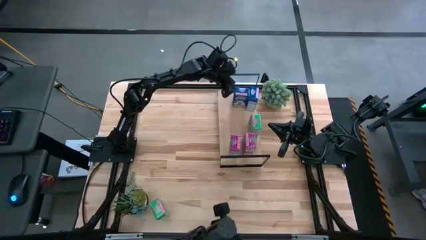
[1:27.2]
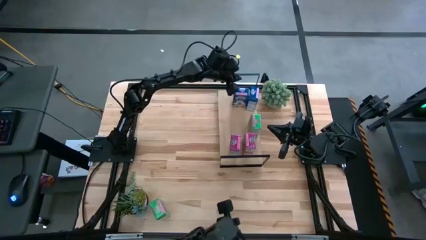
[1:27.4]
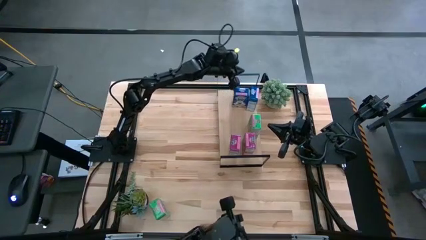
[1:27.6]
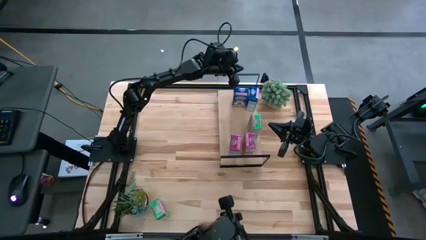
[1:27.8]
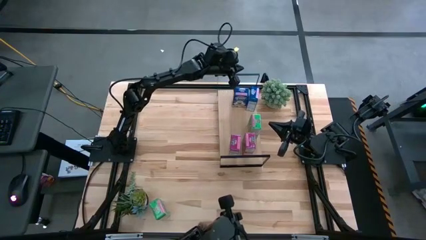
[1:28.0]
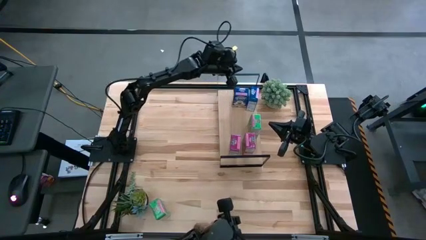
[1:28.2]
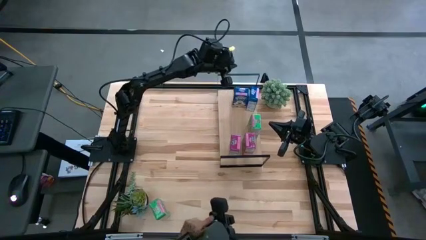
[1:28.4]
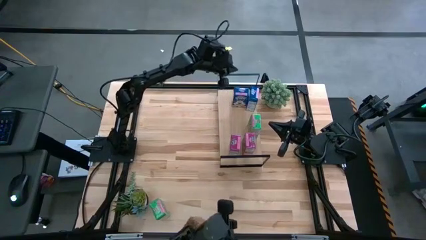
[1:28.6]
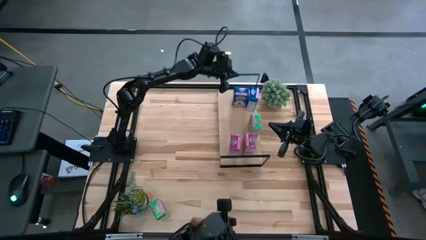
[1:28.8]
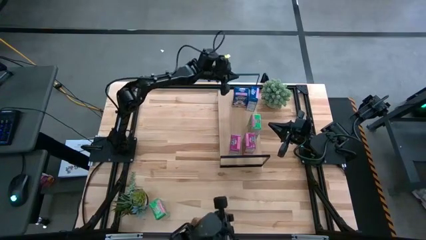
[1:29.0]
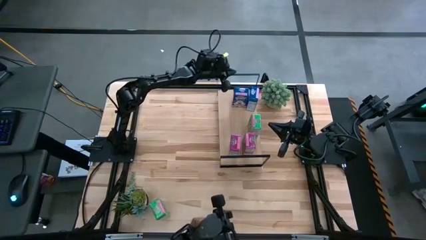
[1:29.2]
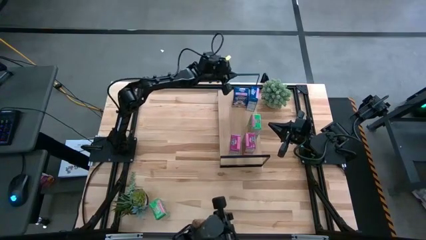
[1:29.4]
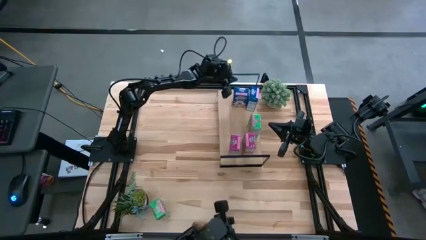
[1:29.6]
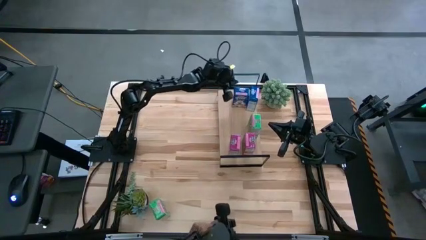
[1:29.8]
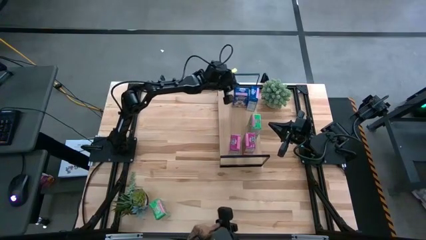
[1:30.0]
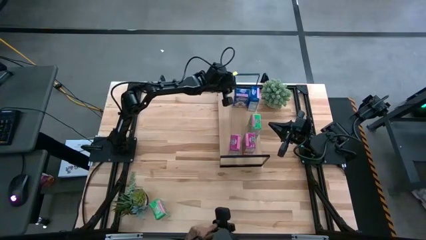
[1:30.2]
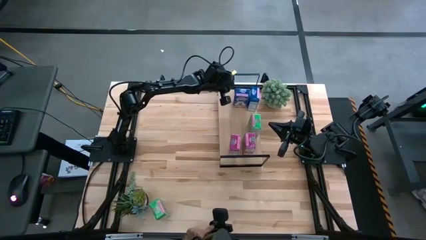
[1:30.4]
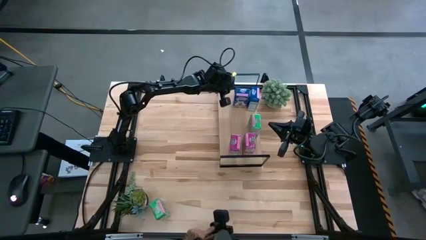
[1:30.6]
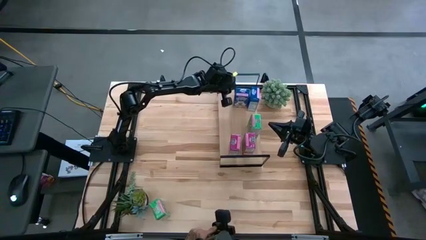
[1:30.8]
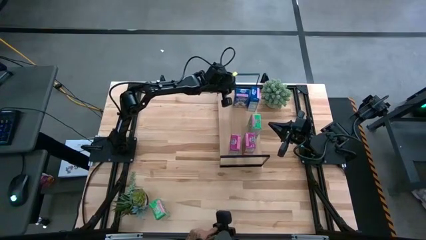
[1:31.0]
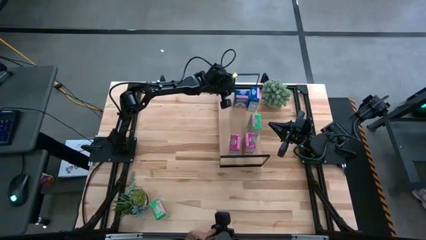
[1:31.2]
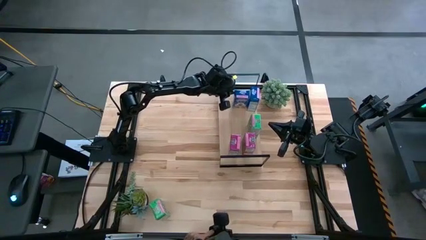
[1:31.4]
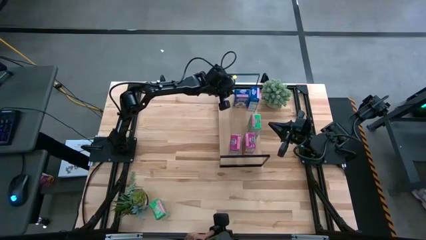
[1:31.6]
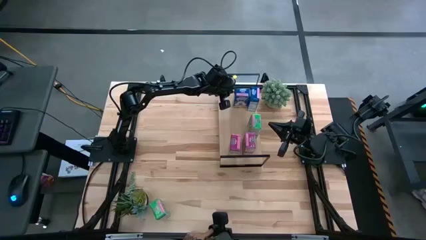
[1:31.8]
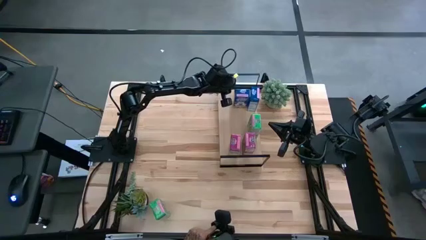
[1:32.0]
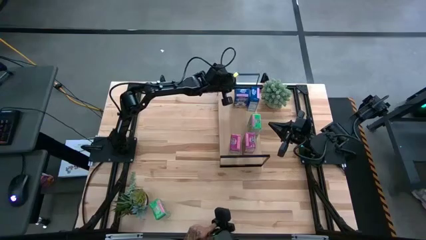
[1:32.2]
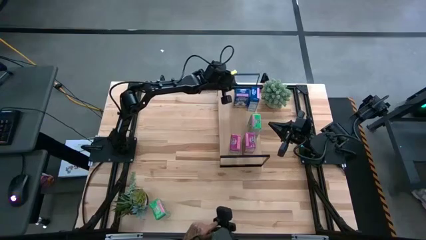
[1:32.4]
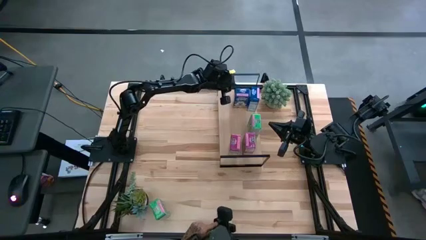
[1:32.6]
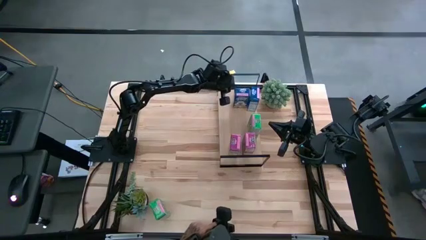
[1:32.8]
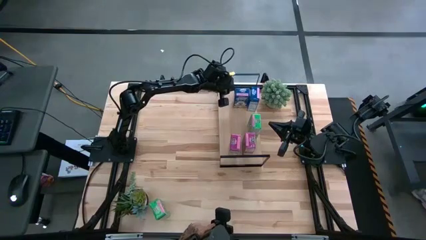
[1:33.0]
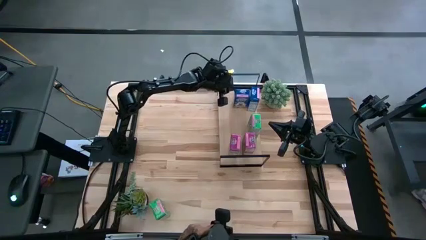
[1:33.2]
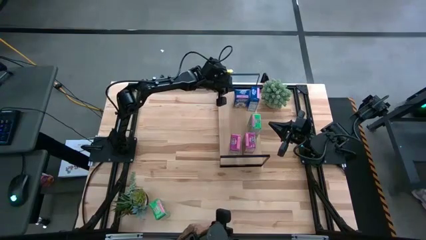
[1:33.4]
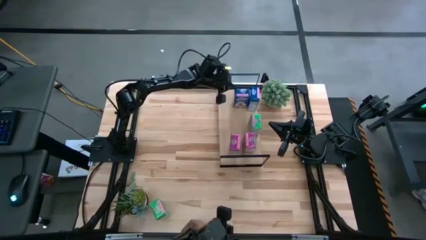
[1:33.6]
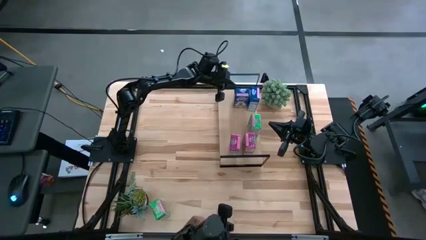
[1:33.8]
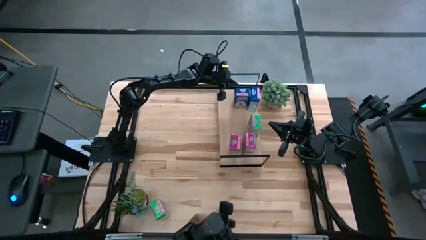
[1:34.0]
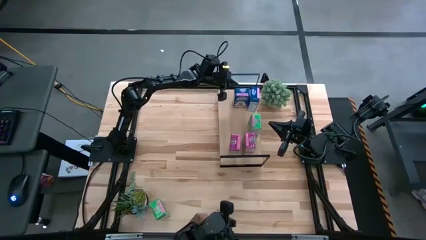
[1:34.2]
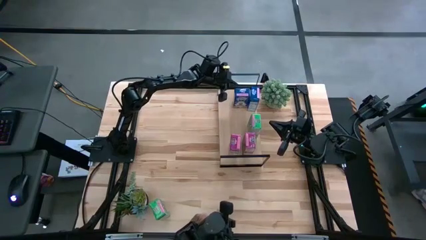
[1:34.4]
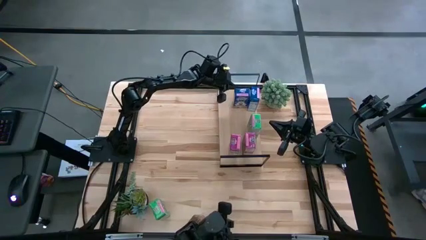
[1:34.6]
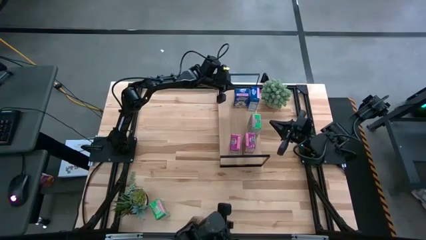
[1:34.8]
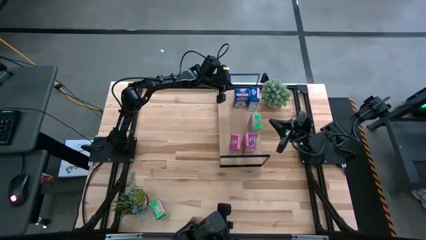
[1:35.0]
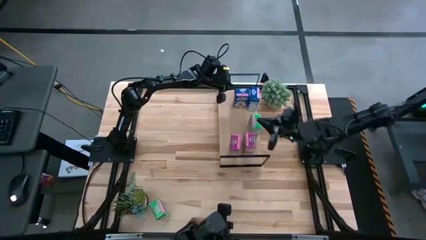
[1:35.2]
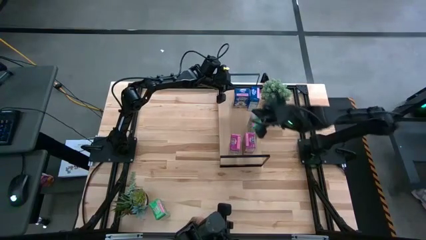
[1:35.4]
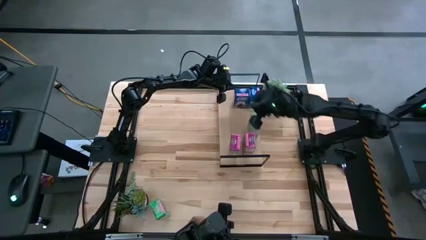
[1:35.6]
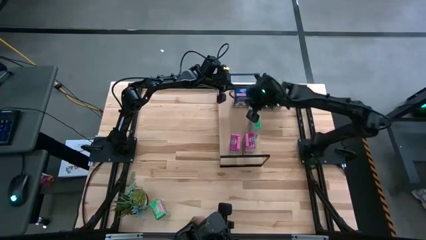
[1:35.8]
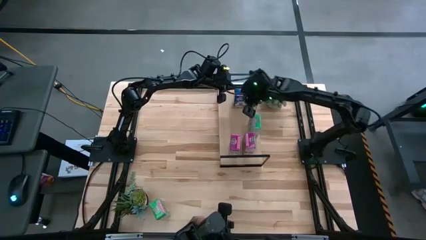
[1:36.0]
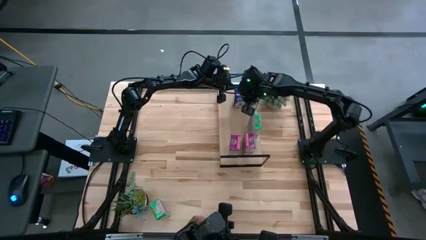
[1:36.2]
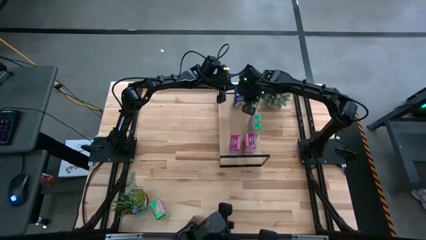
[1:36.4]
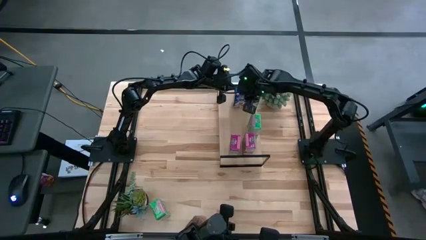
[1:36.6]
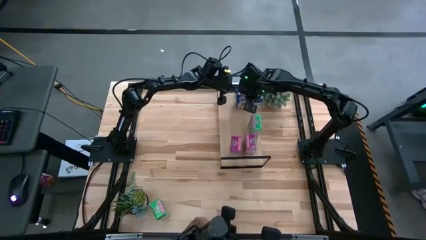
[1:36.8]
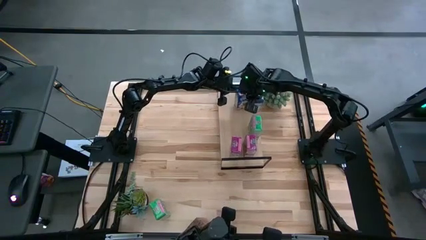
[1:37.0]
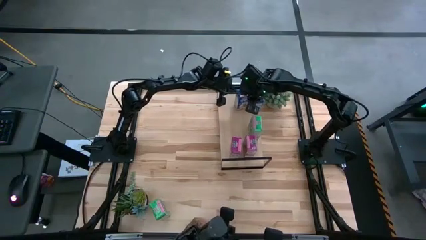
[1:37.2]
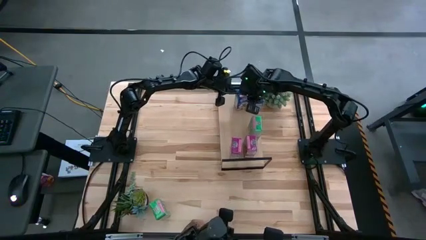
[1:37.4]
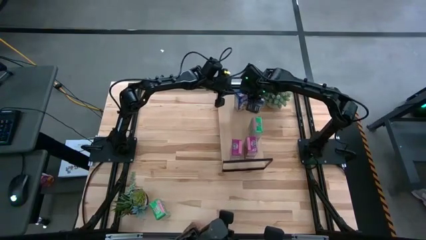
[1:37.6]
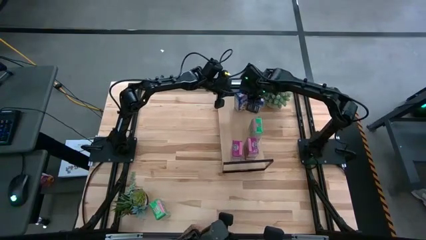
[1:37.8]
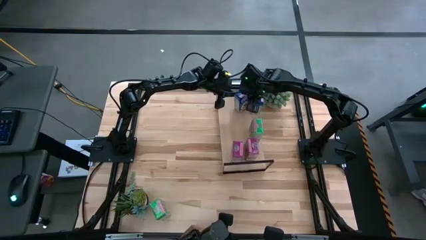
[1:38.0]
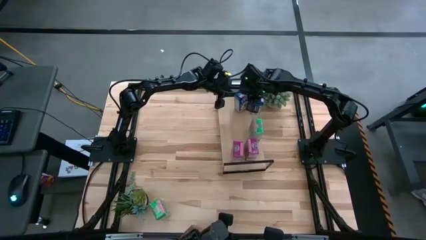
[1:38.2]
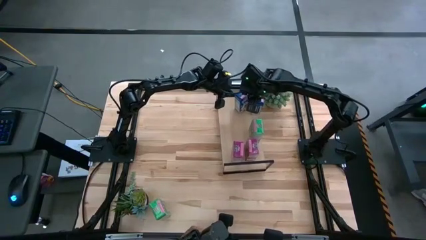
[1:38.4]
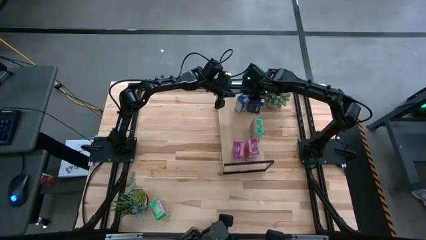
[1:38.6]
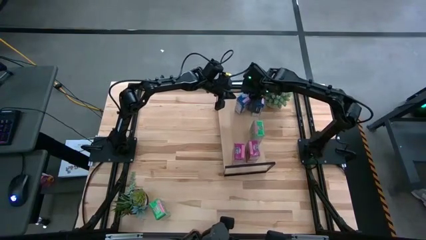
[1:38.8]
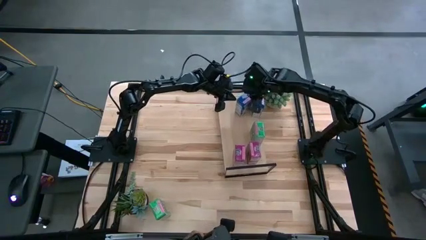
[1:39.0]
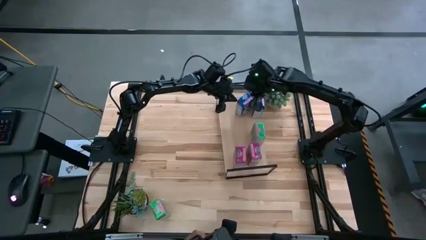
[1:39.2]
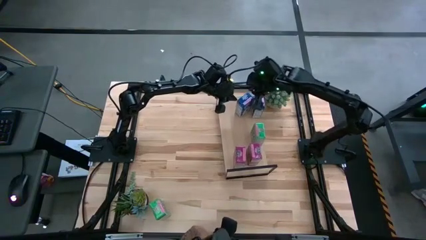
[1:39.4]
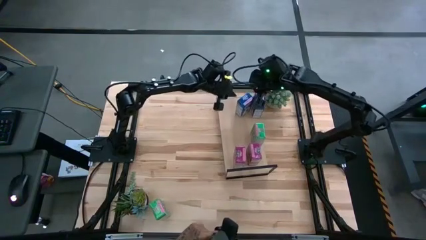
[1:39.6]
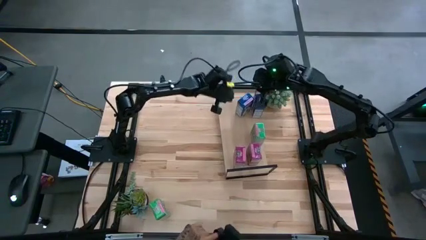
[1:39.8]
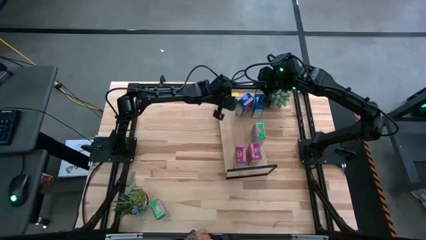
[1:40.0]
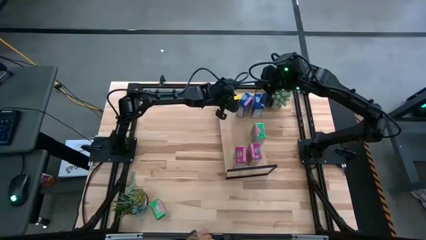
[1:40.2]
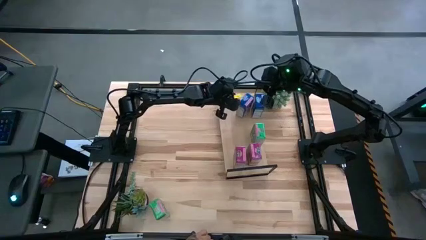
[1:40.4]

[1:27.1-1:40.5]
Task: Stack cereal on shelf
Put the blue cereal box on the shelf aligned with the other blue cereal box

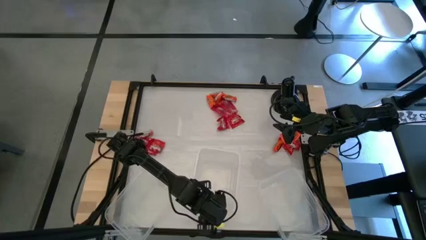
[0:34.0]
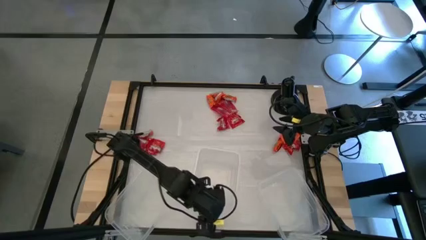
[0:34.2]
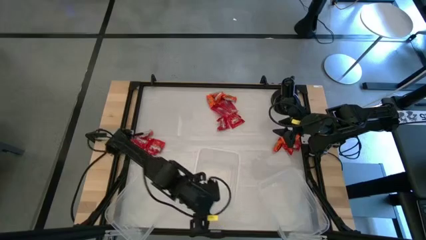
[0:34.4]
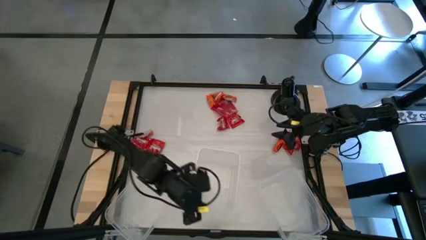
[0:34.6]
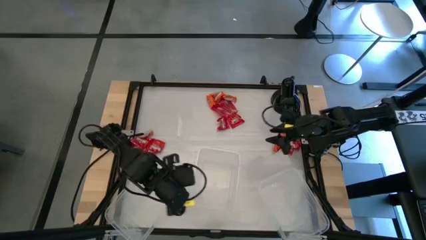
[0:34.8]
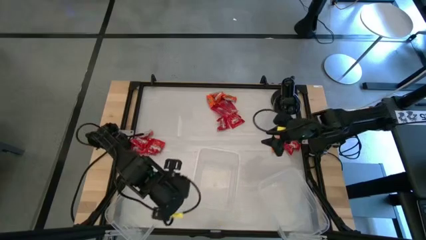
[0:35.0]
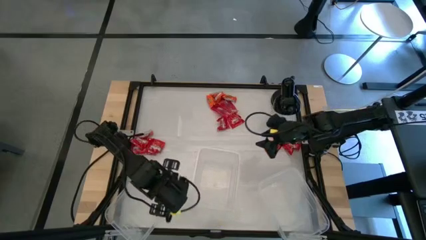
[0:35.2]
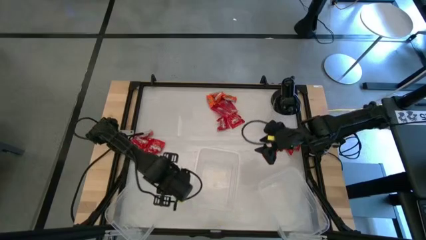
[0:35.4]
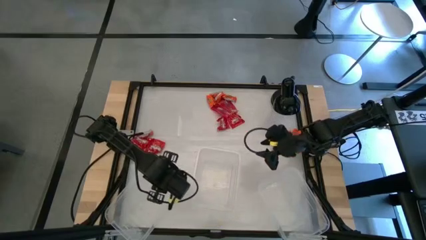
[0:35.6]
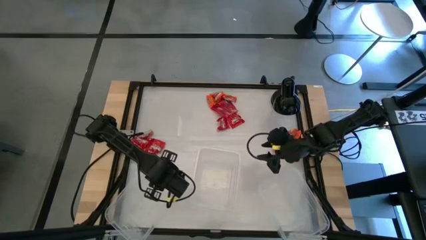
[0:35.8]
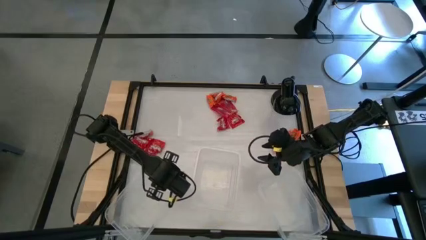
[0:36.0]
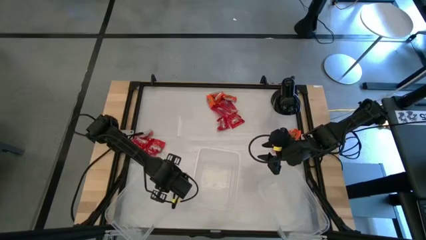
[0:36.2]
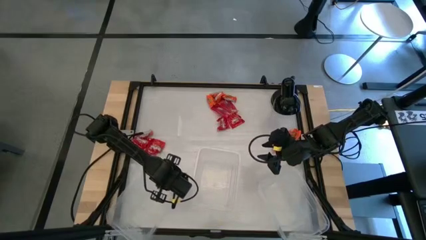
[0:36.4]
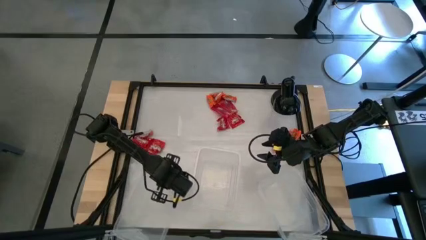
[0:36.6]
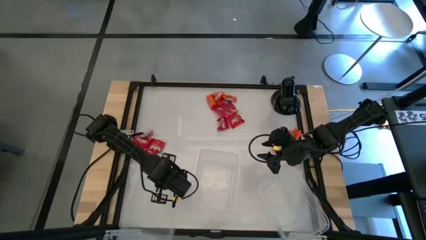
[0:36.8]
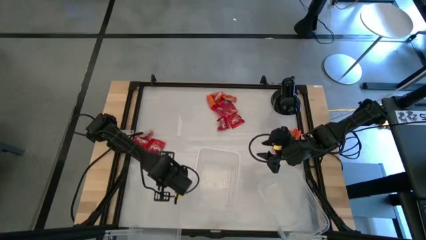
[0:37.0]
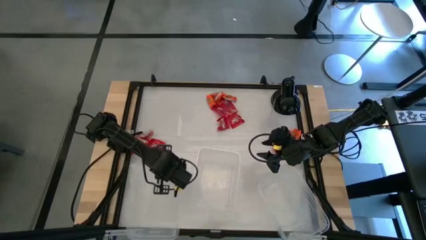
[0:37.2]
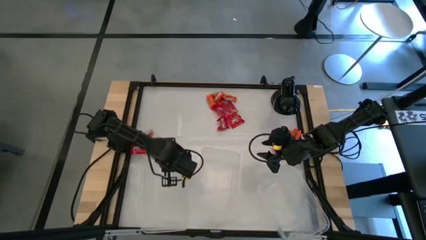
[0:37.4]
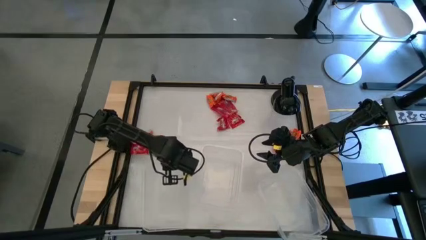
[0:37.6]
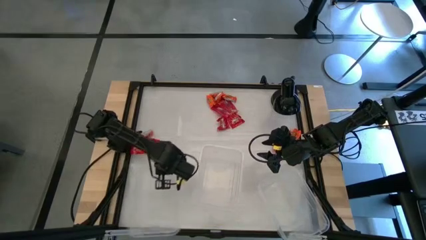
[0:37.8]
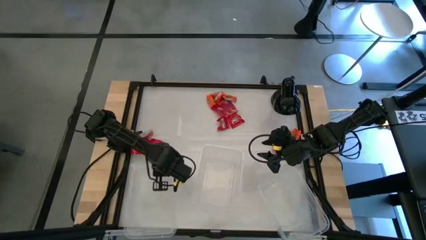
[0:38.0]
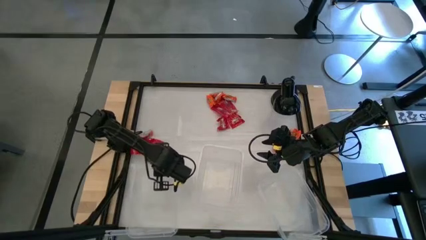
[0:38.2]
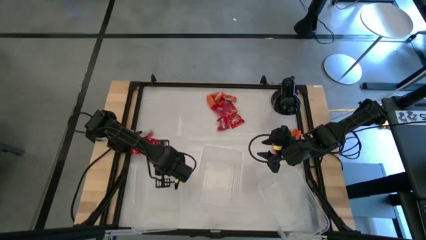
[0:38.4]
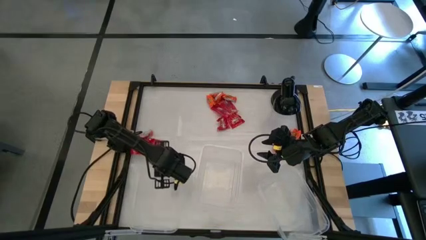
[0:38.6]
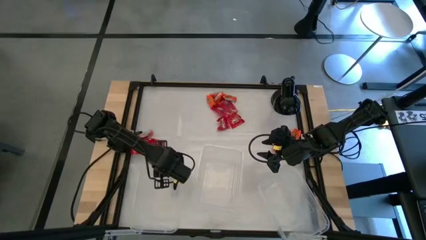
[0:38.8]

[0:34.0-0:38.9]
Task: Sort candy
Adjust the left transparent bin
